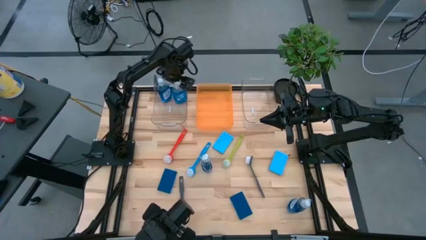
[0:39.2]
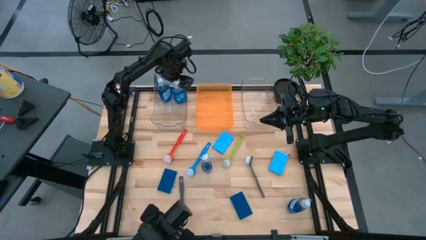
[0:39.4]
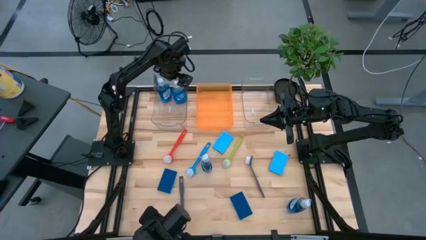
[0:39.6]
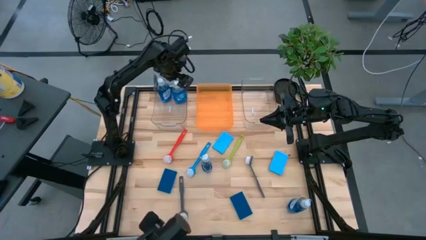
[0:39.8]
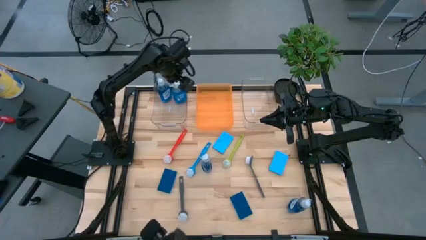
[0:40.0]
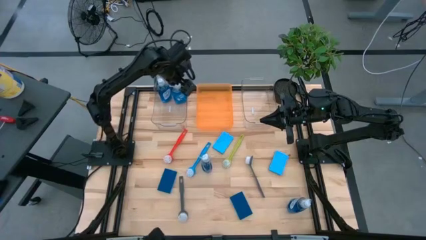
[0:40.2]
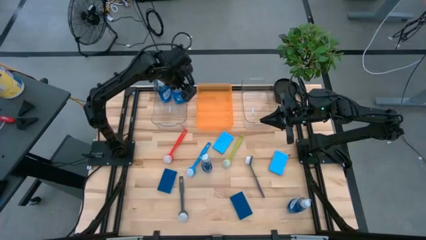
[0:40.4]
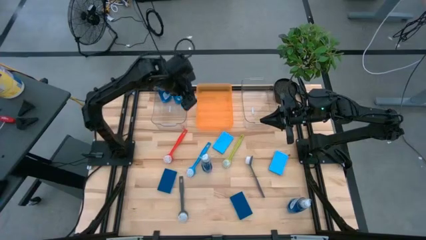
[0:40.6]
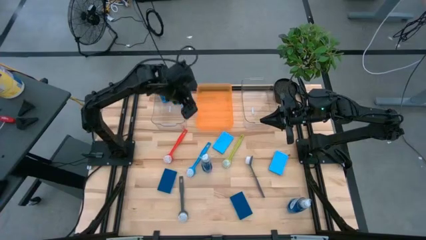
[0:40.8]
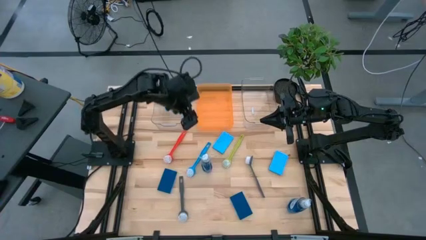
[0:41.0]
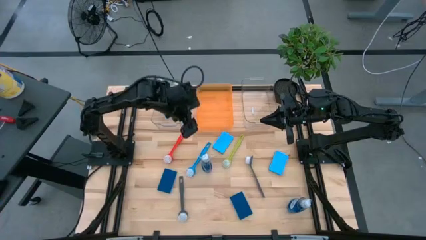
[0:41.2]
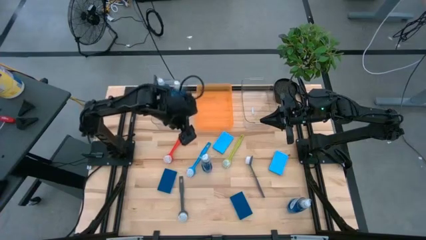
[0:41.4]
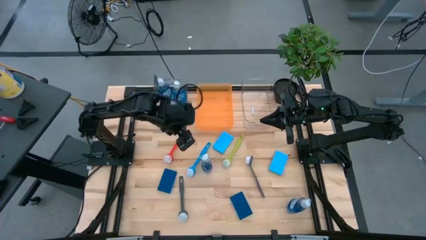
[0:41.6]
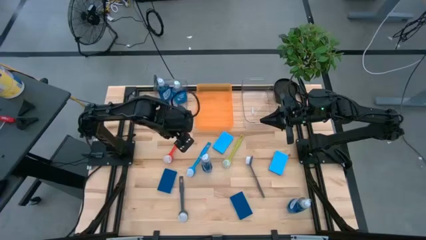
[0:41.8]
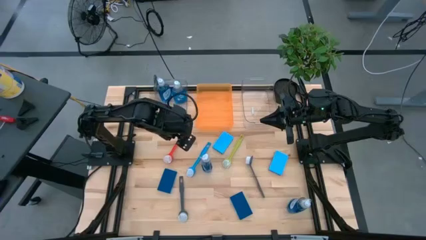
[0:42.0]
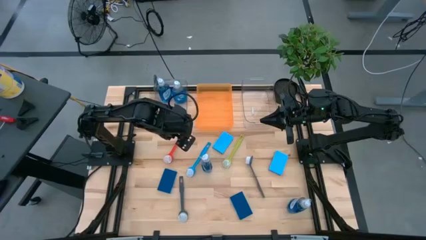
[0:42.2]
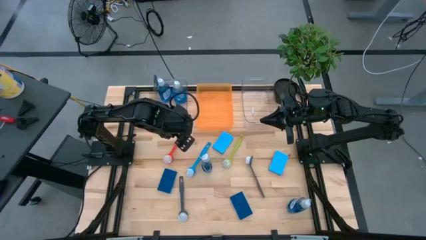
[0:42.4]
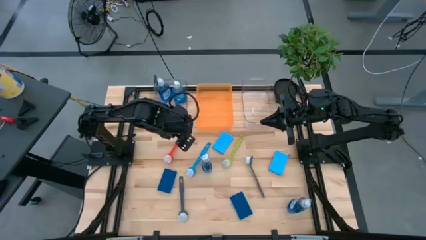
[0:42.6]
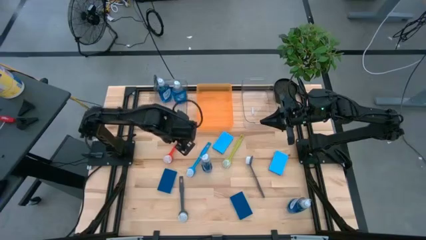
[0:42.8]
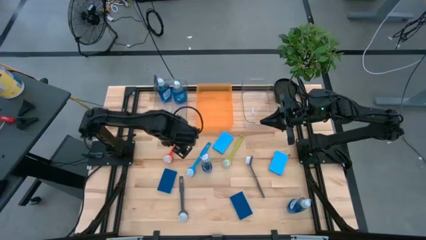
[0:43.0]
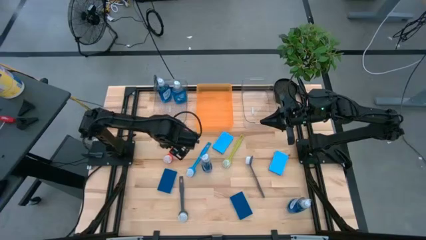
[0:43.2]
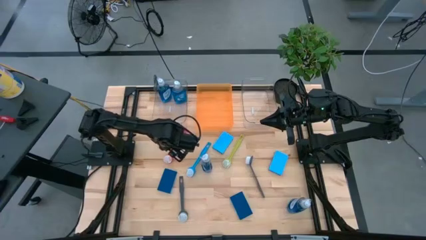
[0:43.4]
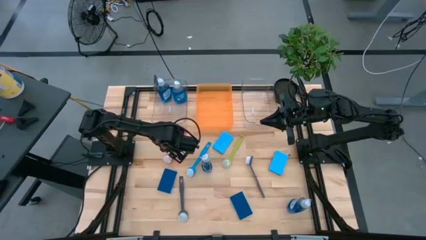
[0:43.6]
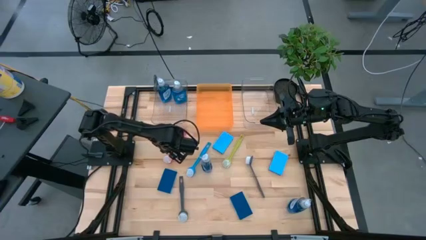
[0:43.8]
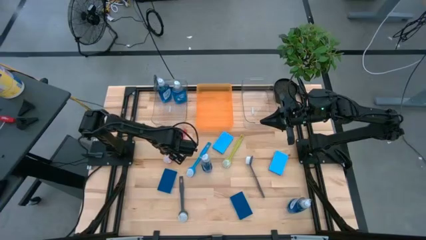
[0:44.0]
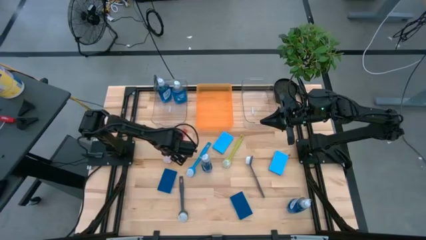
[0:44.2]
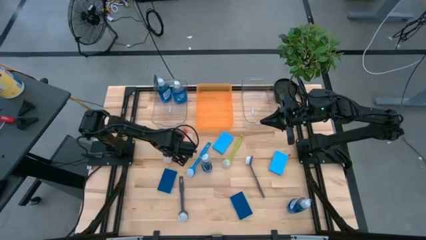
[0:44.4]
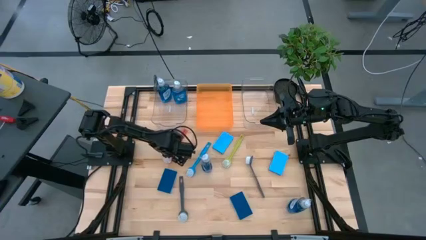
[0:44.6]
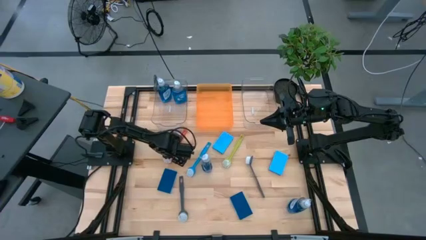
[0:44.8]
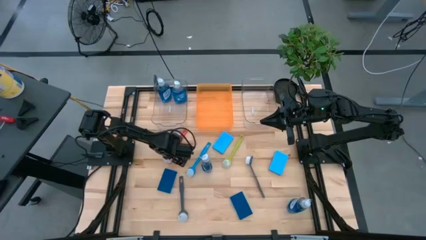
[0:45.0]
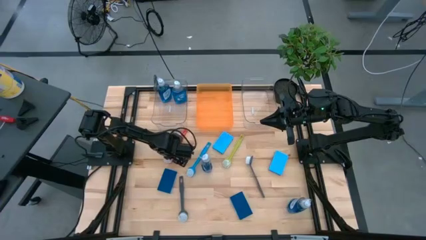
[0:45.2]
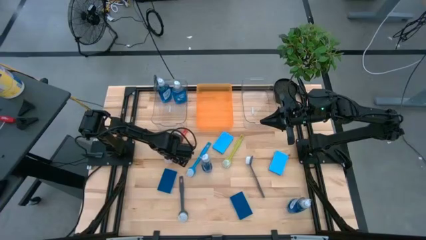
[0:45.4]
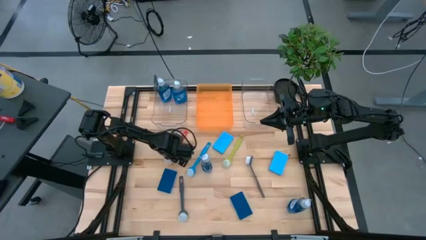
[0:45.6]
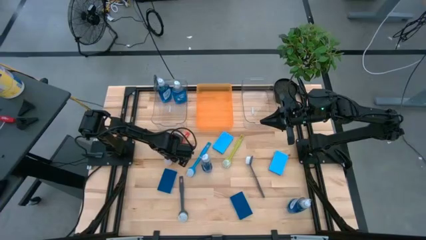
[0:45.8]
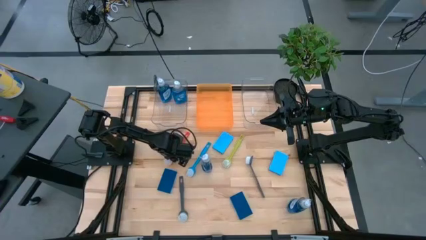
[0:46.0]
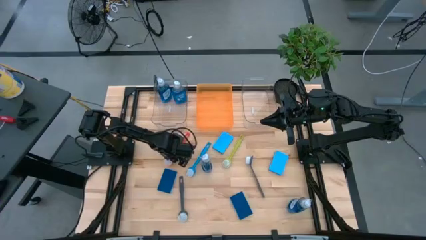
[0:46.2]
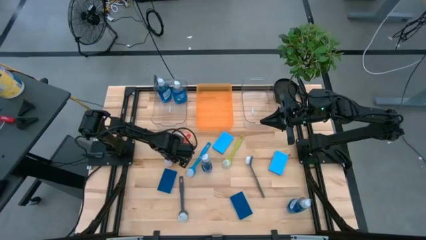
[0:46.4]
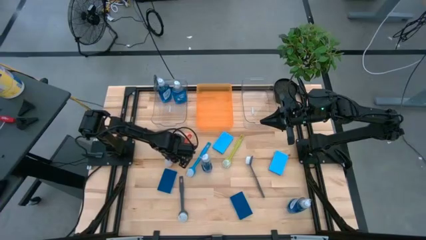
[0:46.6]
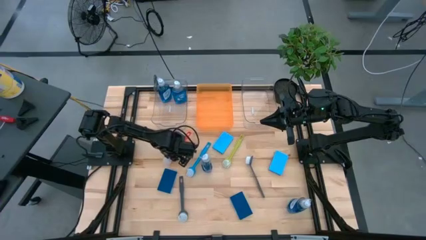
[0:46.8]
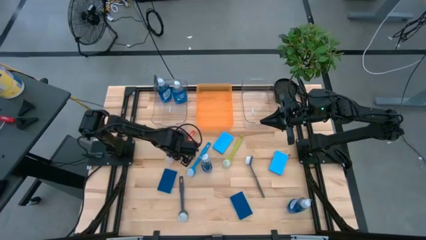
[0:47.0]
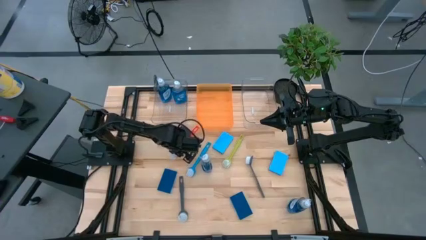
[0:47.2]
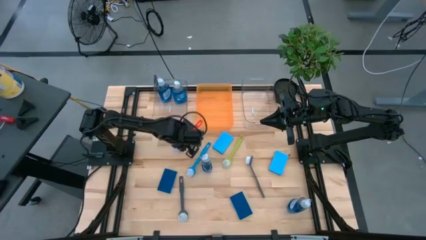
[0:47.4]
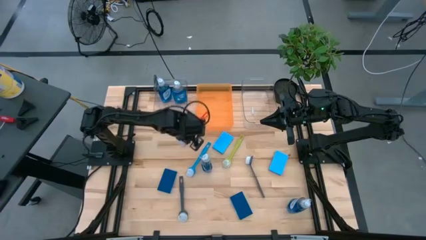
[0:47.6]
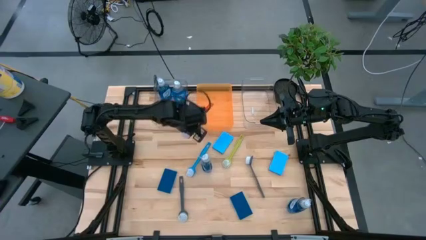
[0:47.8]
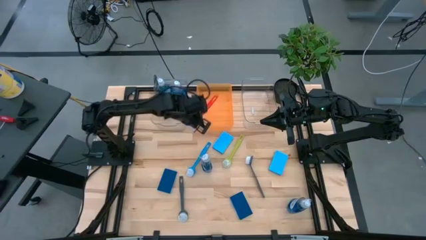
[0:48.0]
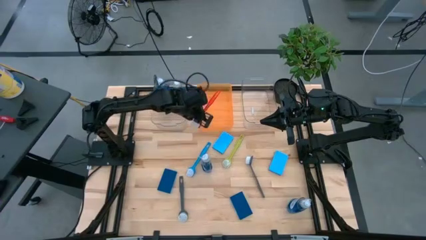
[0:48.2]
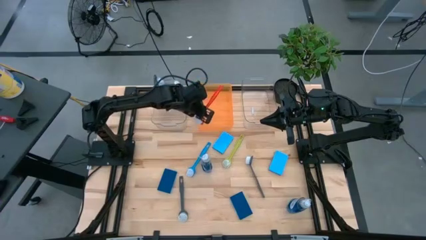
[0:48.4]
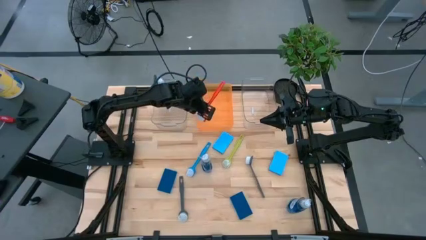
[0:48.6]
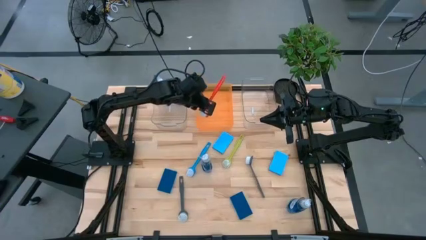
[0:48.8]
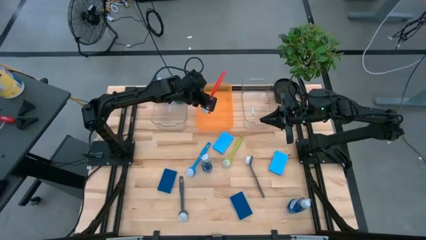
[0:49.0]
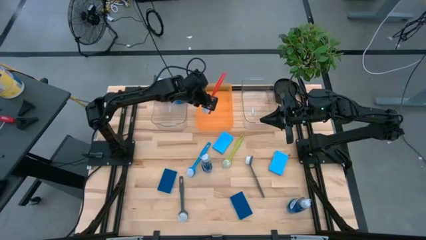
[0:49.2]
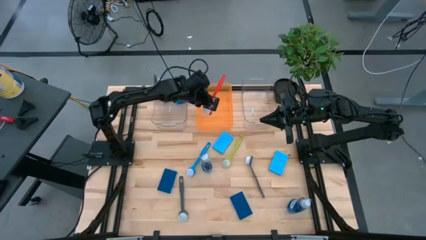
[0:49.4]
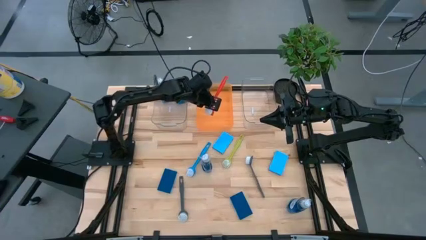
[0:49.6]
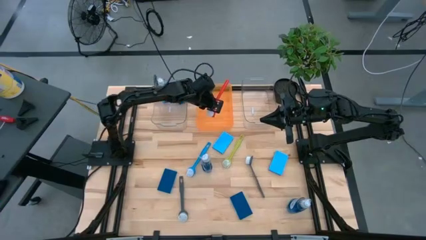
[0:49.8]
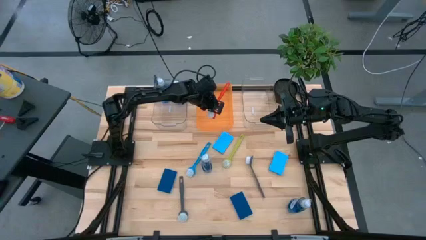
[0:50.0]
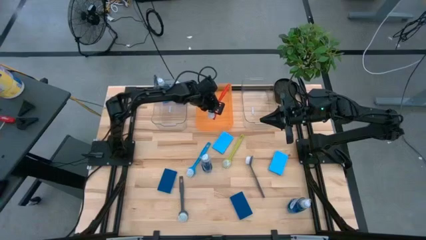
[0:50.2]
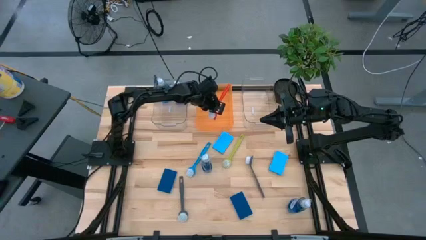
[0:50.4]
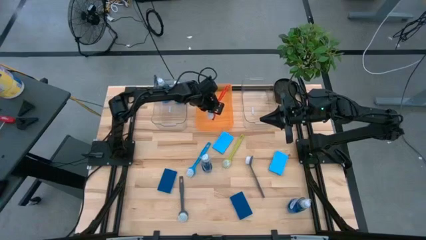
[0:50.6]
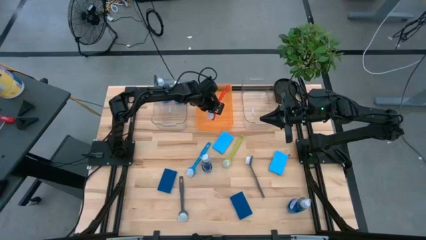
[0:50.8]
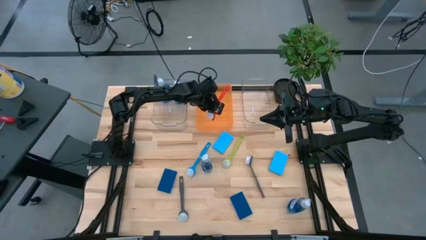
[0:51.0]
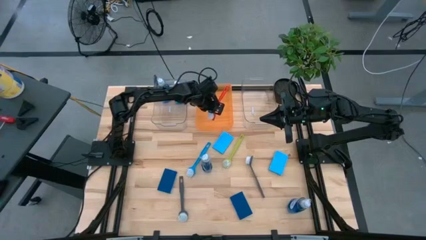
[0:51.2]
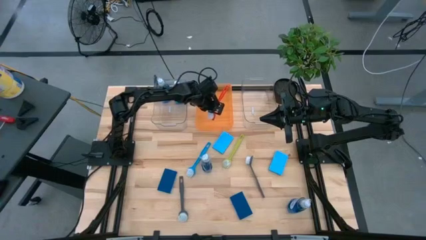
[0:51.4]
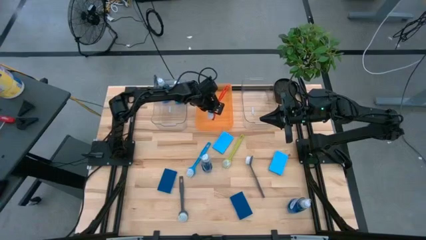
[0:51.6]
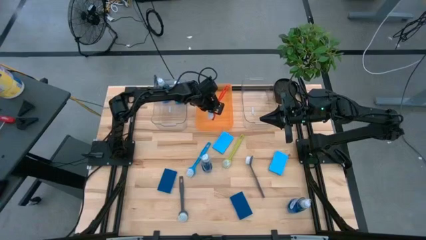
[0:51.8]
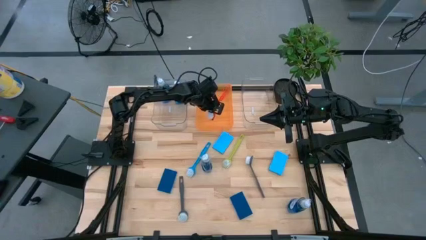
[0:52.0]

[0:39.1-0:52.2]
Task: Pick & Place Kitchen Sink Supplies
Put the red dish brush into the orange bin

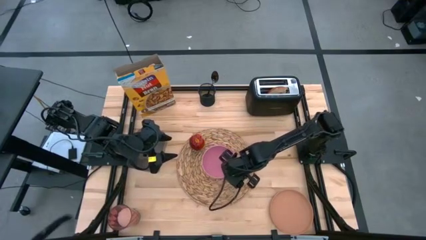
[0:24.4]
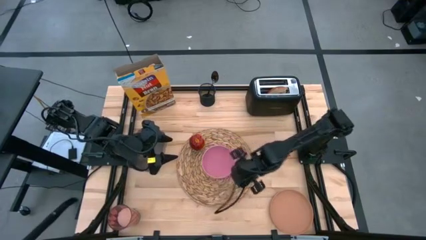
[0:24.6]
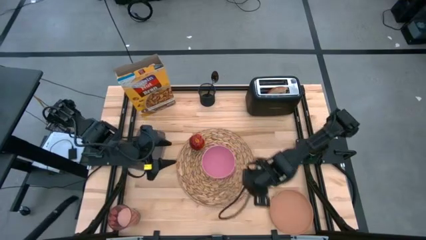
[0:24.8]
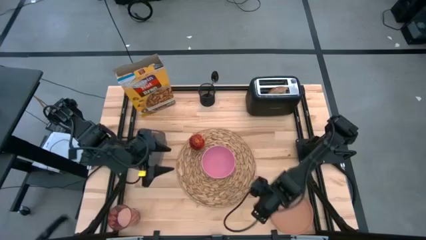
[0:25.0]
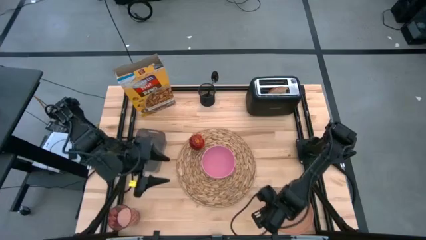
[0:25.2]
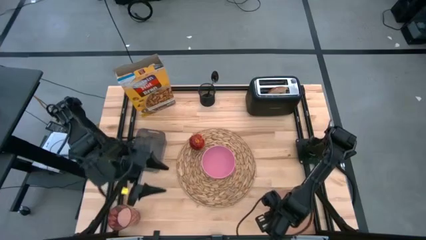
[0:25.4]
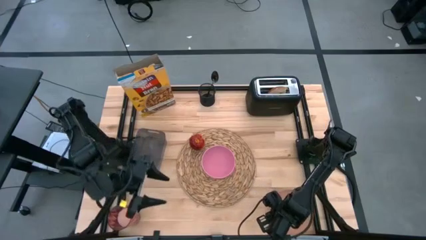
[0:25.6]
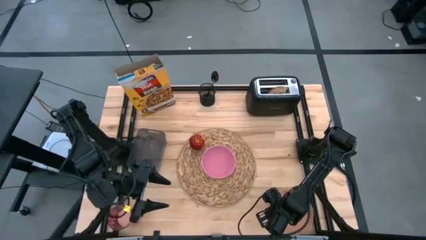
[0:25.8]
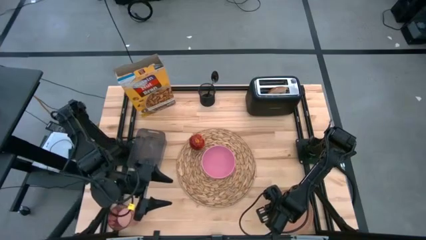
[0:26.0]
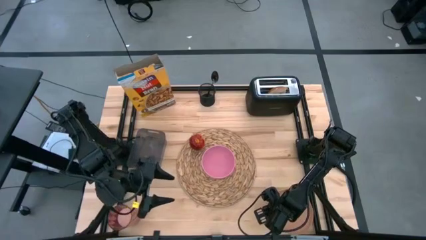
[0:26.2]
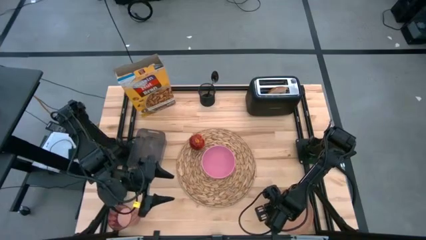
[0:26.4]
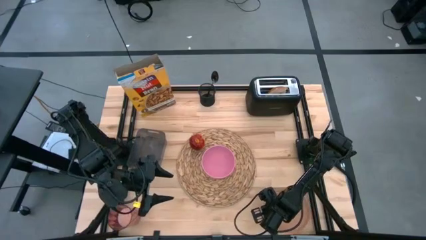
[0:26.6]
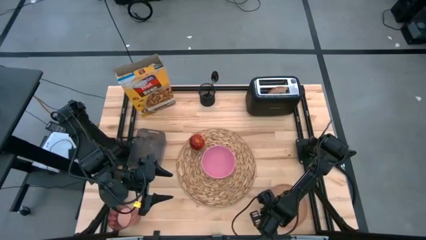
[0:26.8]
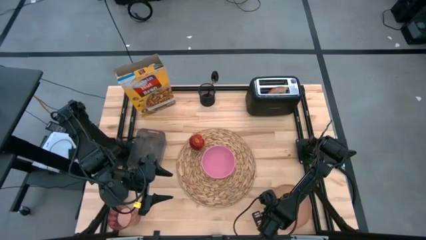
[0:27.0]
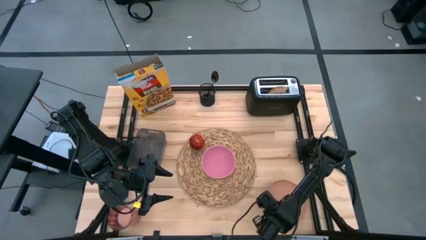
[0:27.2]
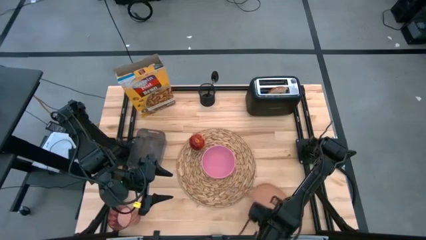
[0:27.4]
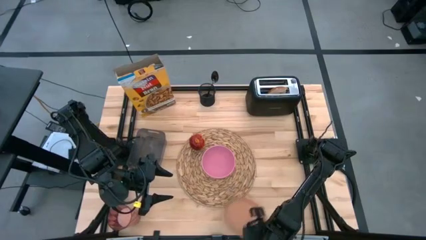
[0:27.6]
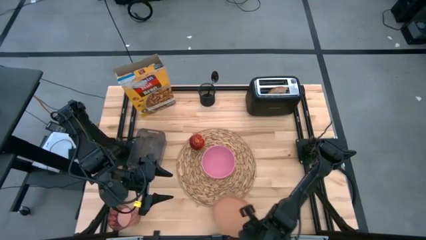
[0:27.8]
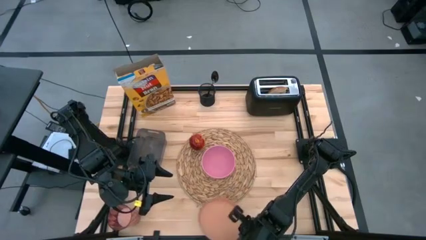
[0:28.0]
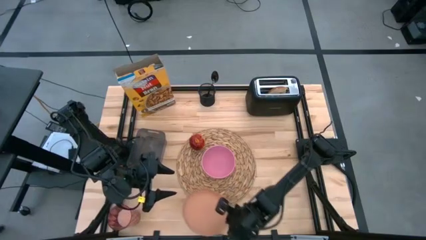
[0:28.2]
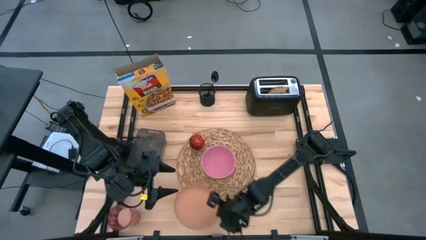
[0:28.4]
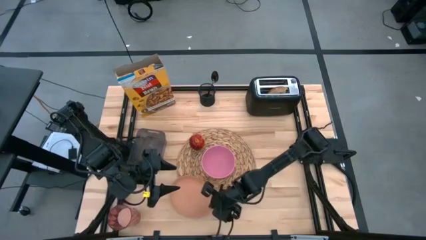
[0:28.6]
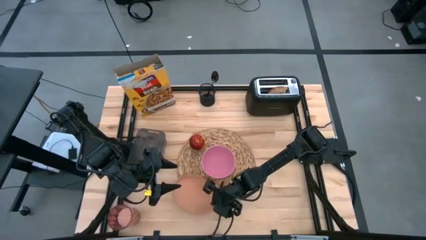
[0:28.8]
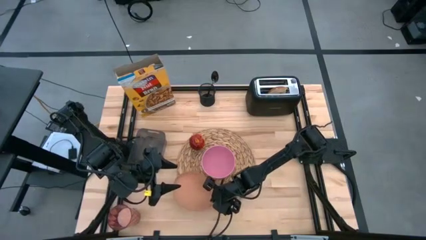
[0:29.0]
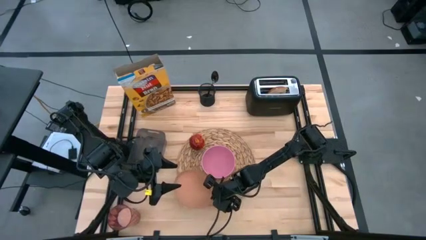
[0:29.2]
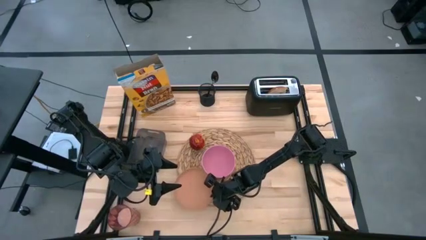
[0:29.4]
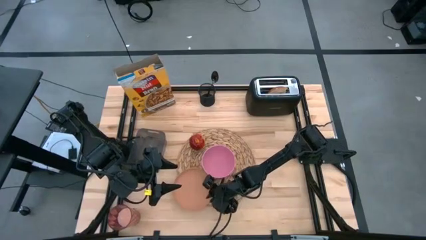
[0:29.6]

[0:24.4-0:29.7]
Task: Arrange a breakfast setting
Put the brown plate on the brown placemat
